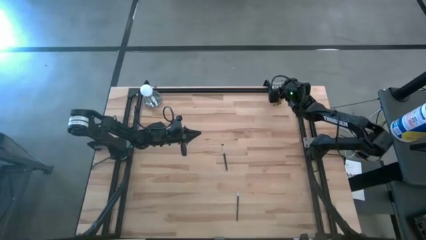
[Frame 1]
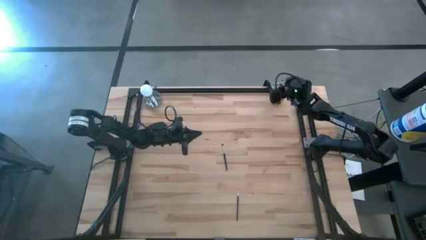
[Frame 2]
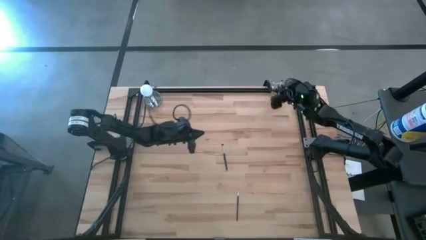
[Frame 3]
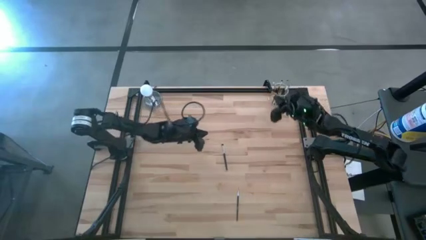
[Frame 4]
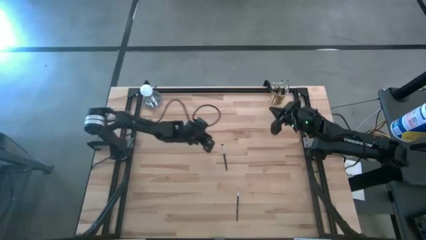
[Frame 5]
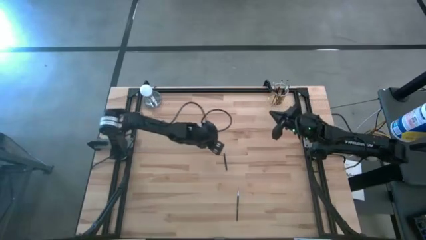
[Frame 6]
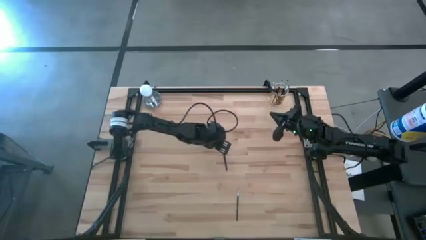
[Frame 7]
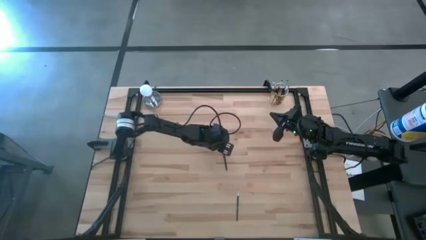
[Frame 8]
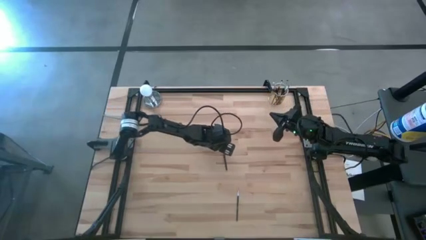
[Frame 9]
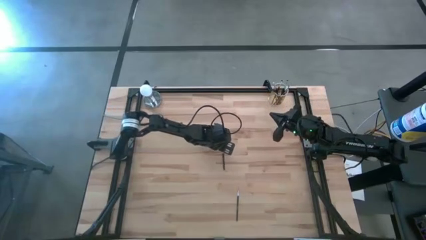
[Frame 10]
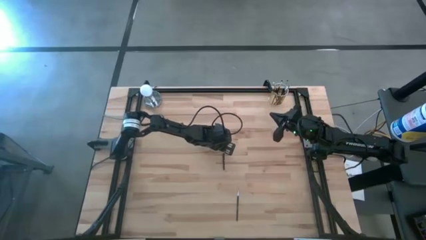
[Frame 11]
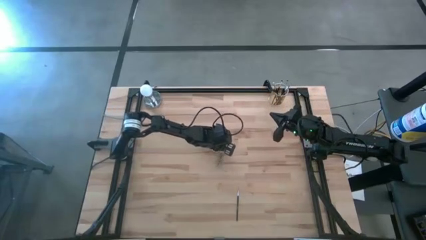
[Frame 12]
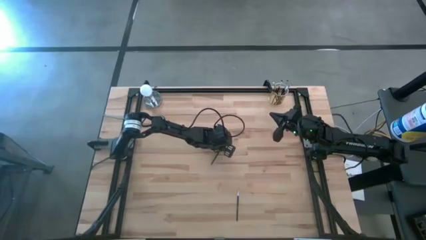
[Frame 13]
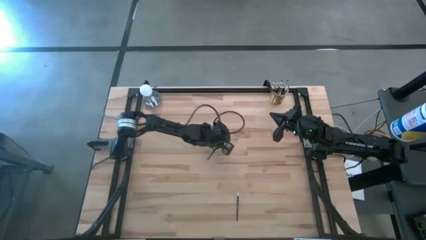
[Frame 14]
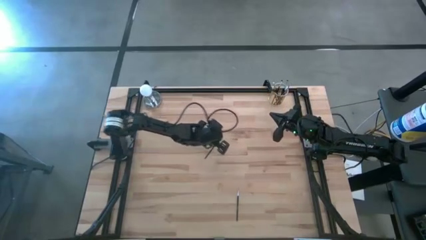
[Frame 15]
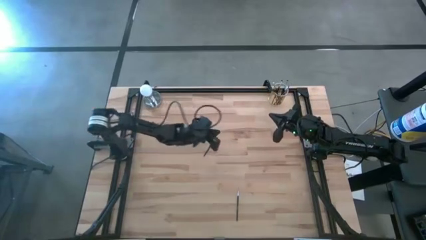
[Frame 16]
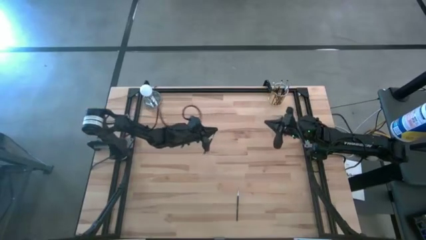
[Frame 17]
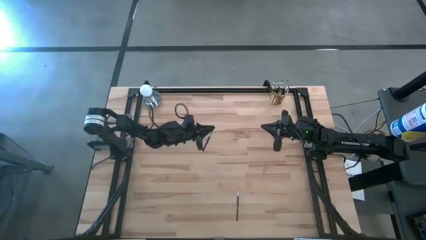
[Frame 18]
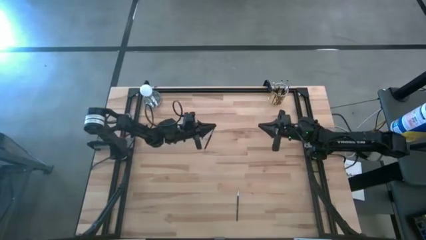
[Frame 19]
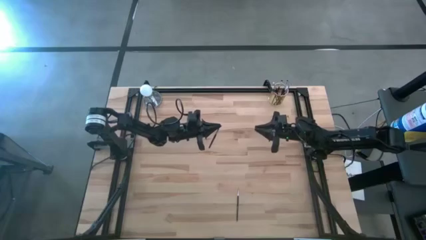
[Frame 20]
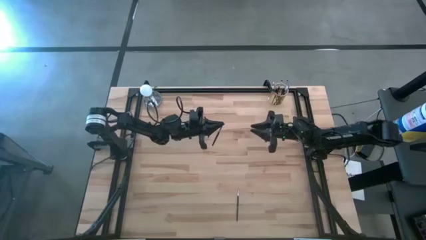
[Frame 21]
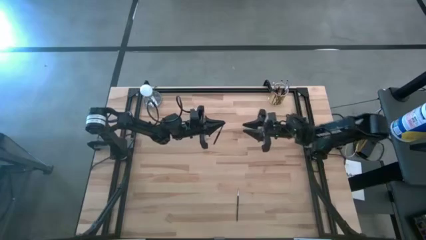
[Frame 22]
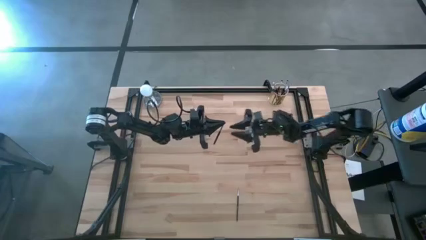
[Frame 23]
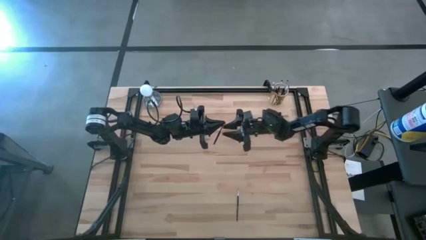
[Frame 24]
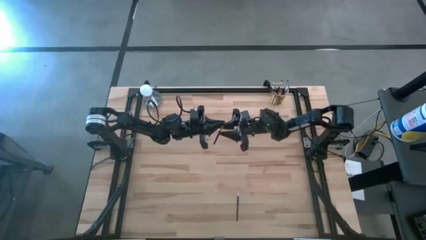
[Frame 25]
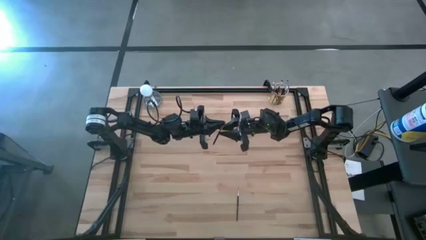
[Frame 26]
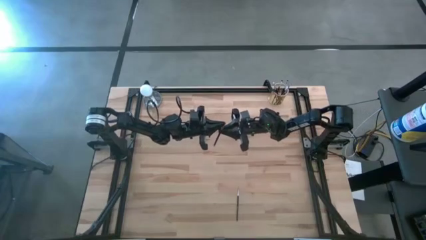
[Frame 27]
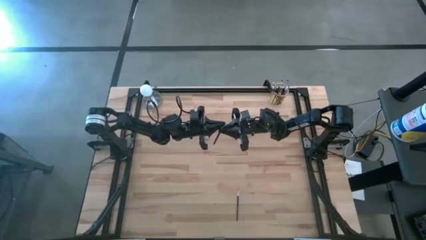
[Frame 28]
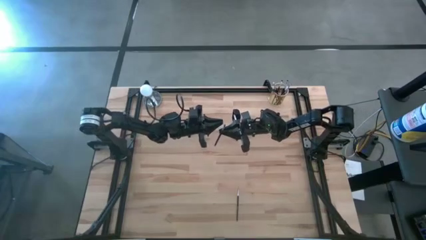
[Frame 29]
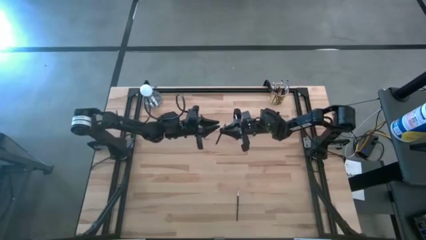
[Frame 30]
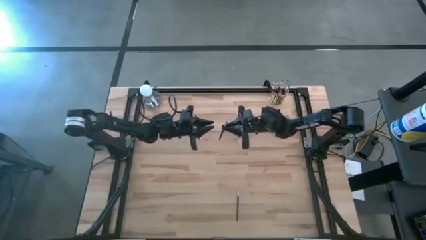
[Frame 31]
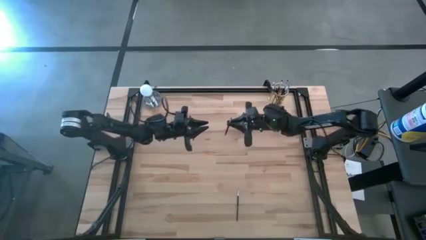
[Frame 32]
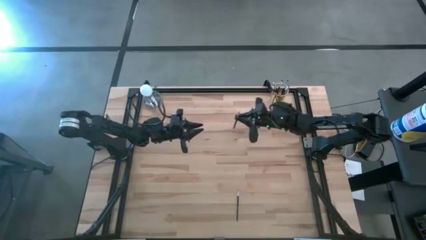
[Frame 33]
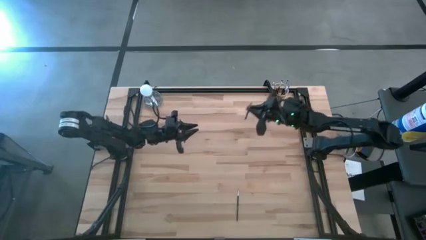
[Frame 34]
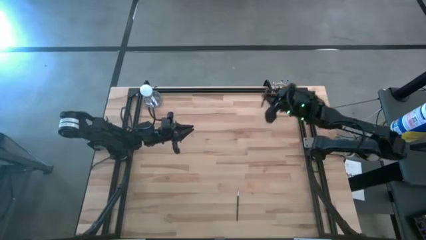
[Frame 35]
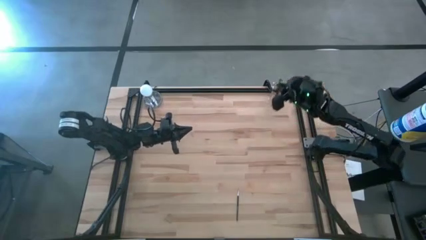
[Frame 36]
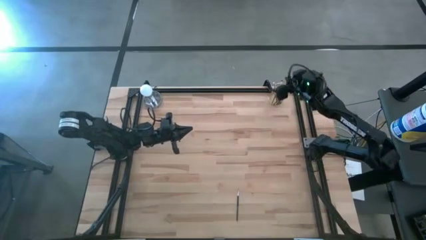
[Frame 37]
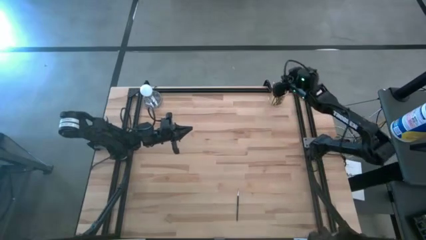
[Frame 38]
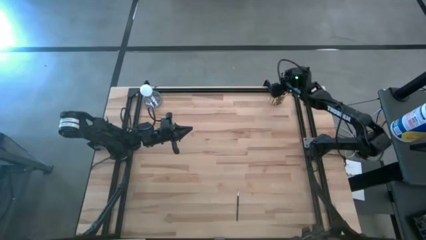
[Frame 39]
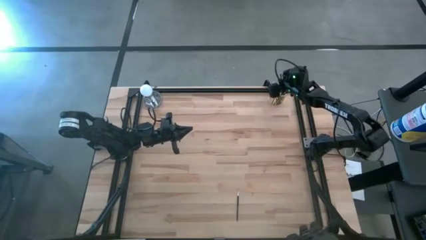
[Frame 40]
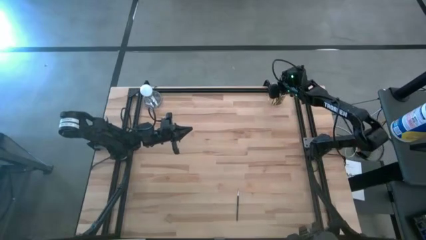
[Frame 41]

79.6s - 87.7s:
Task: Sort items
Put the black foundation brush into the gold holder

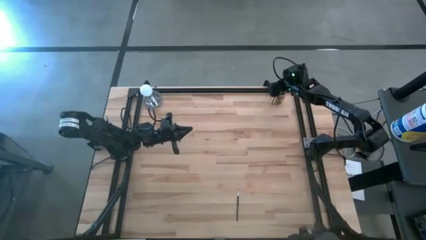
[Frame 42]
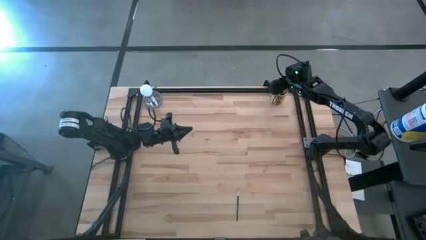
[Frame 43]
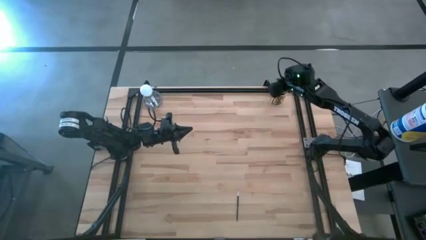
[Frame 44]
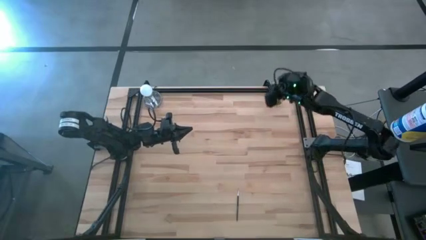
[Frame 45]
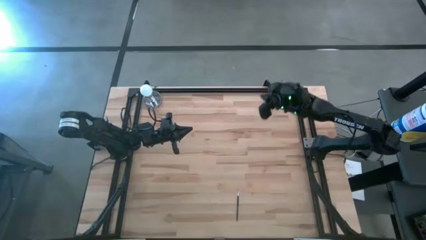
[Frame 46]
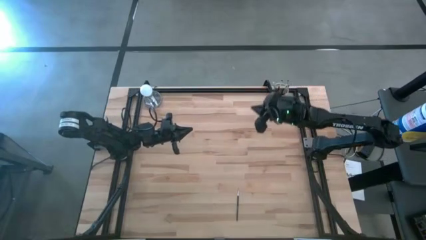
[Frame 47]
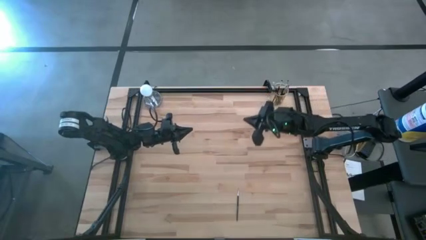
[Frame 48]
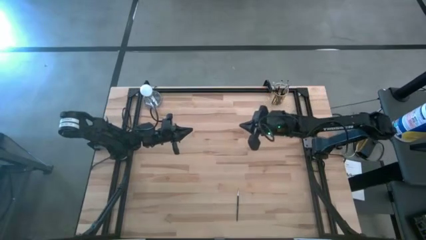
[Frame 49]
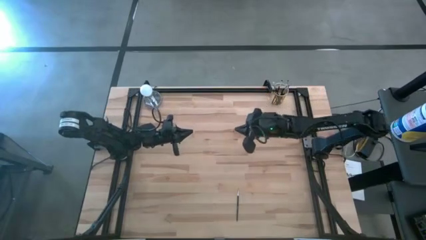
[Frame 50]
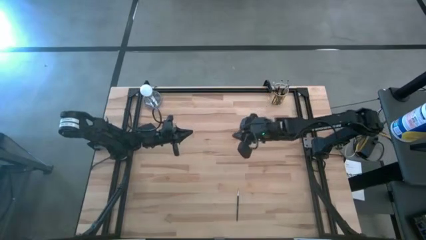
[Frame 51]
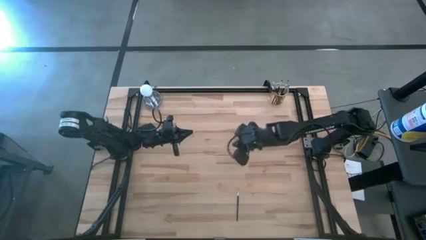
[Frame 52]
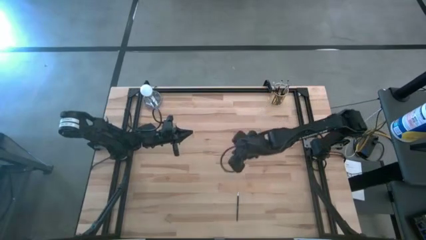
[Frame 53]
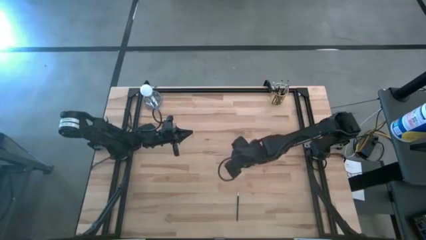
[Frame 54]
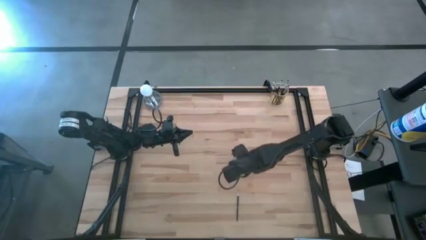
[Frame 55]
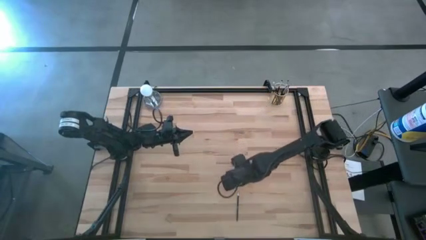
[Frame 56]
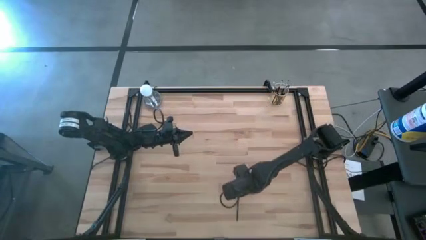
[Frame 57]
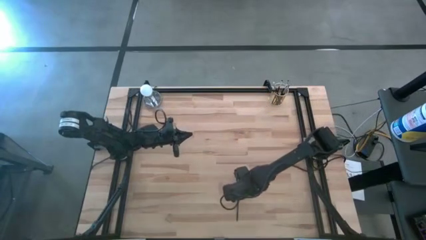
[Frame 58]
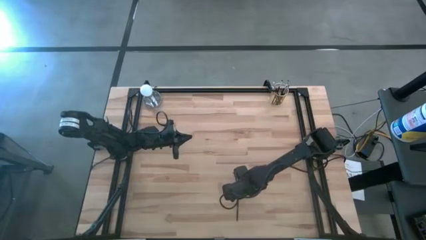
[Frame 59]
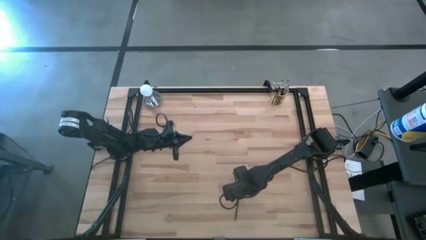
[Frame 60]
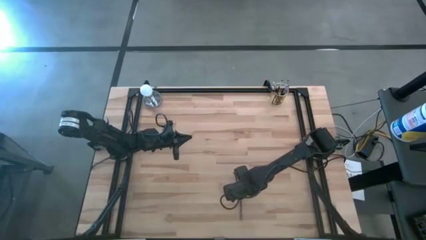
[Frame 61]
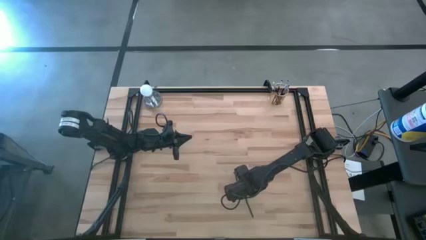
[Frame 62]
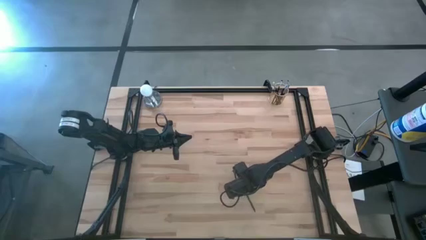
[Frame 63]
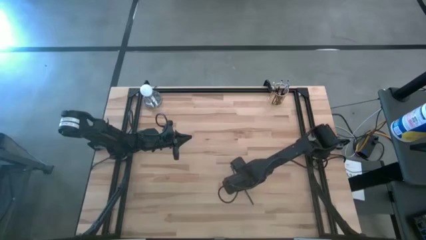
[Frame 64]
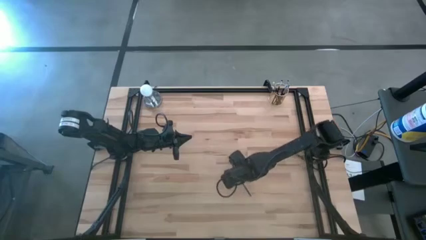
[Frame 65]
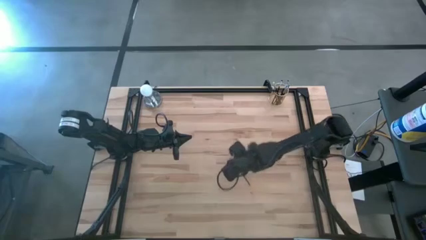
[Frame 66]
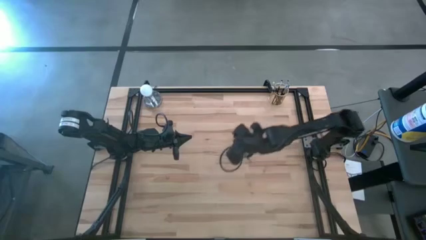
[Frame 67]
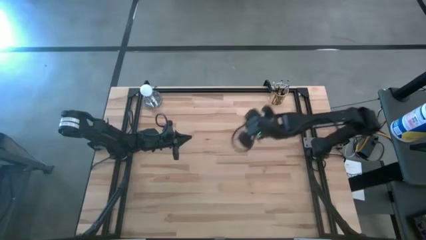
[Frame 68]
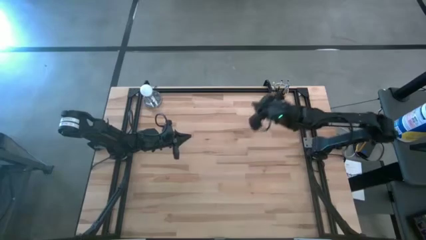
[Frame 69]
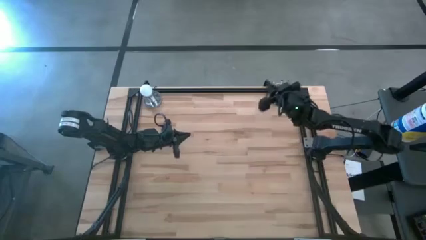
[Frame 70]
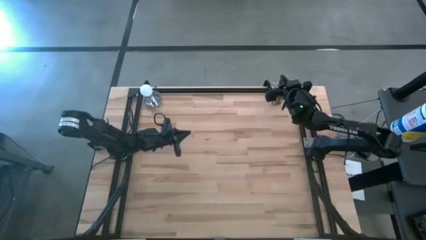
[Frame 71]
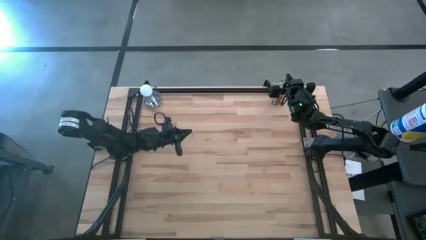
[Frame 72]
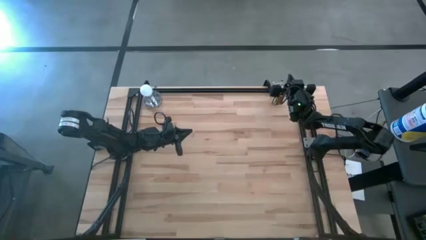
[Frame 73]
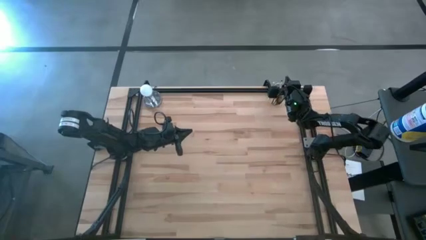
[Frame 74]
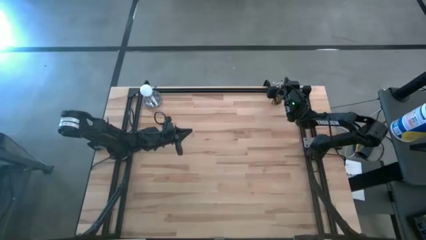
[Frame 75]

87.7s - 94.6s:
Put the liner brush into the gold holder

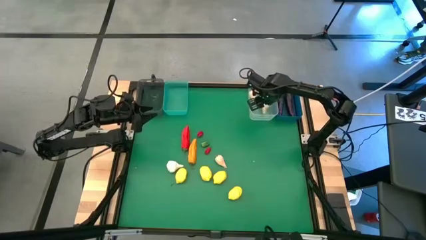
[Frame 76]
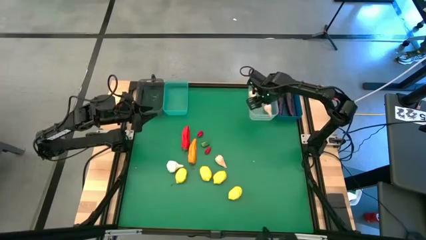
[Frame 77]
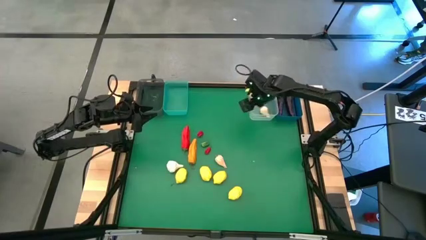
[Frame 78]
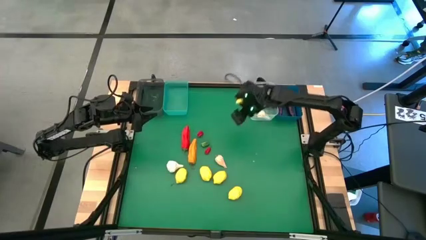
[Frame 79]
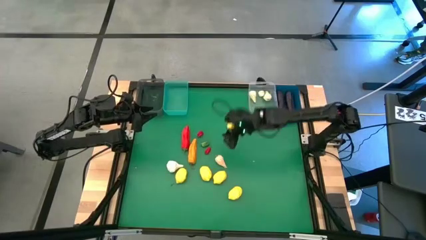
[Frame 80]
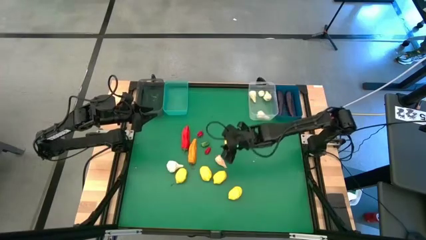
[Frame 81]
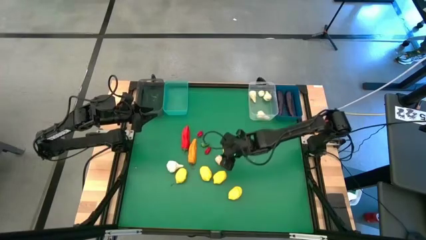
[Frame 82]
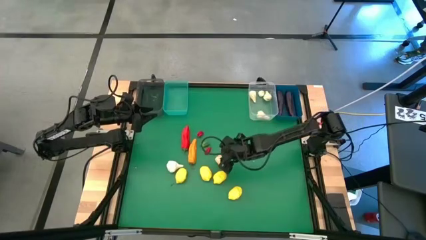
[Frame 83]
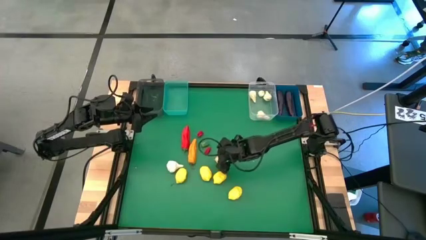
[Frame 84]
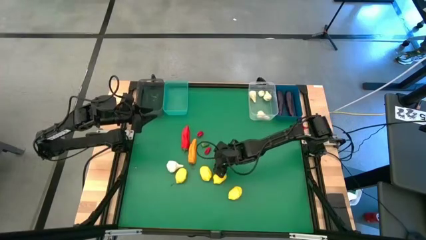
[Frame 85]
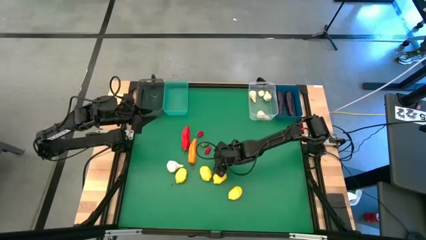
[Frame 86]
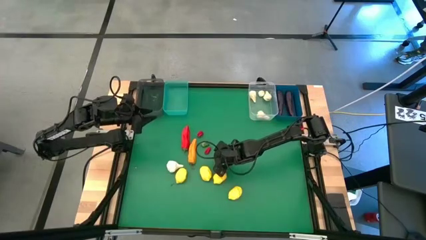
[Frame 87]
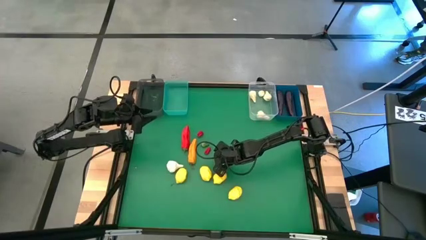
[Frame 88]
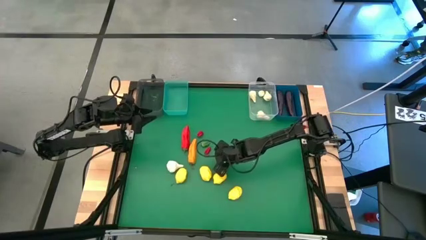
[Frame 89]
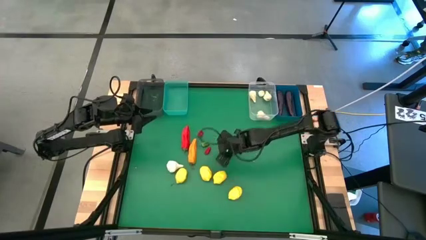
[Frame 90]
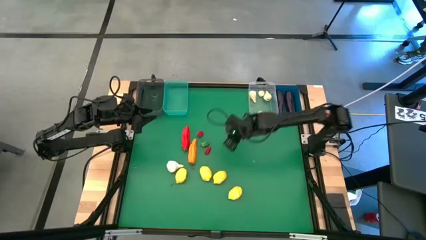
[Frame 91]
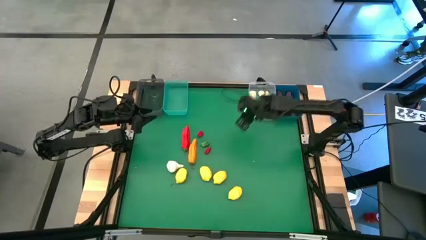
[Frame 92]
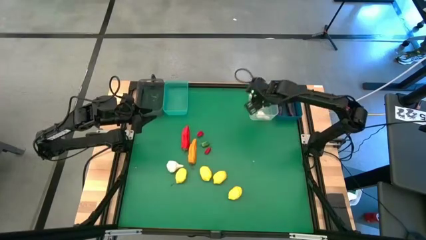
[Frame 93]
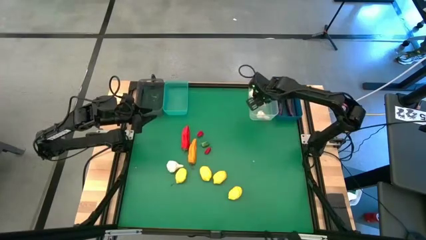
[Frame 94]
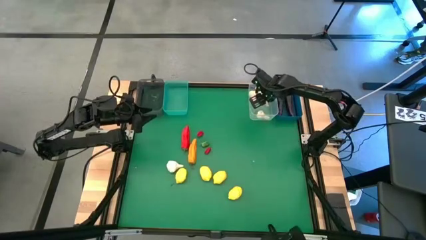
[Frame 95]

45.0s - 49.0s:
Task: Sort produce into baskets
Put the garlic into the transparent bin
